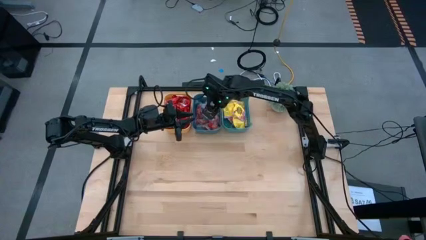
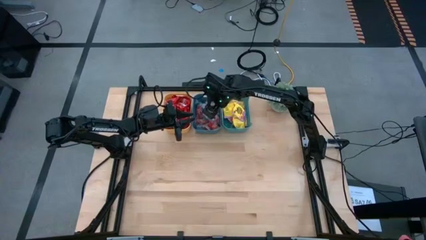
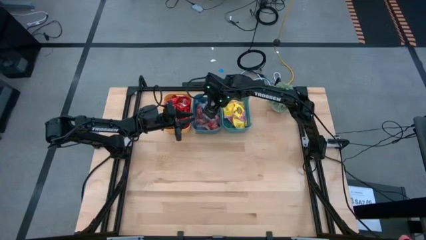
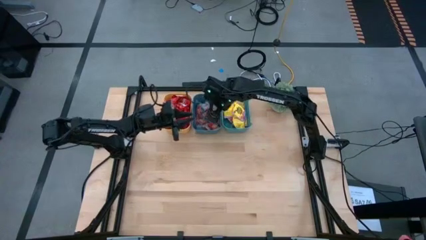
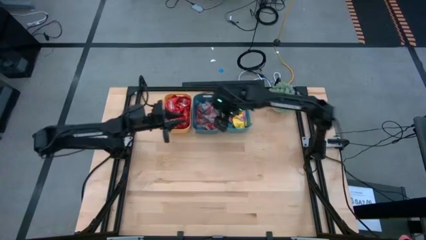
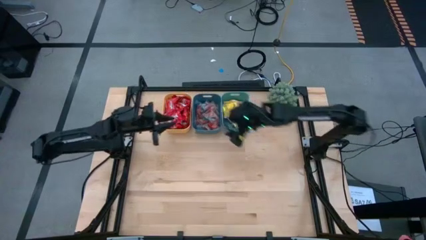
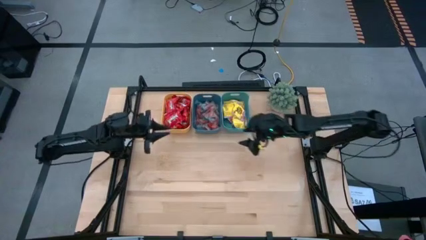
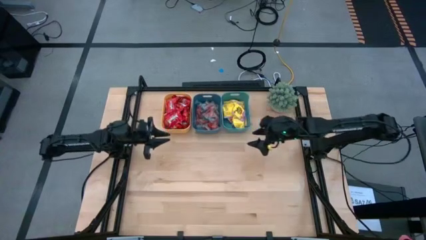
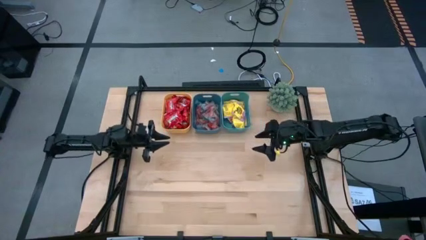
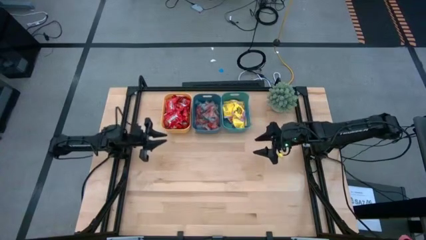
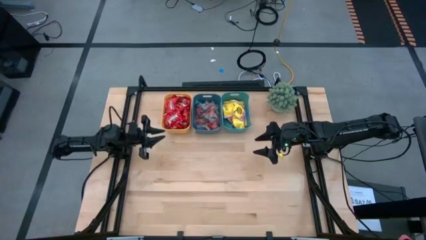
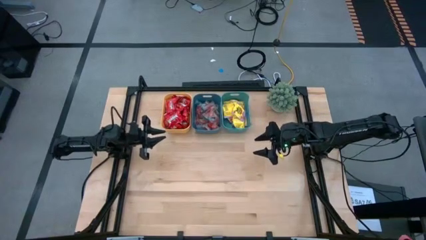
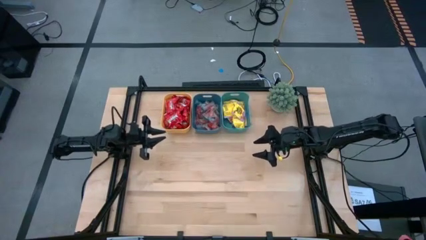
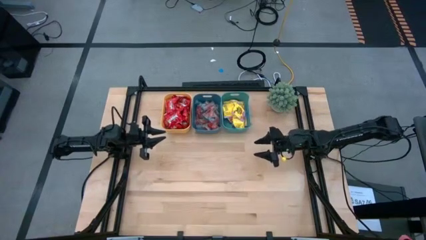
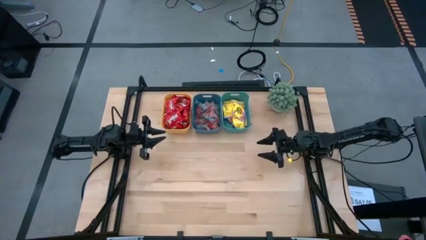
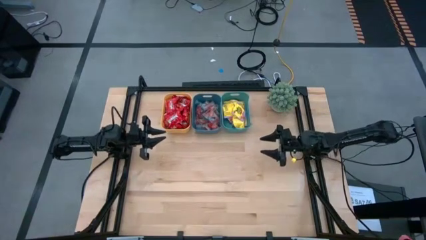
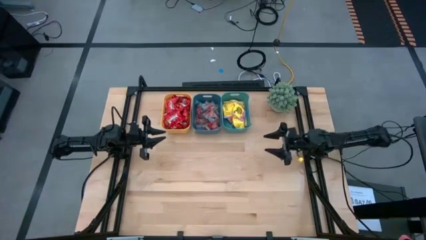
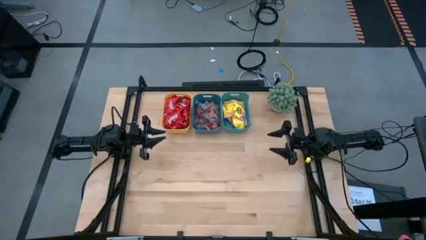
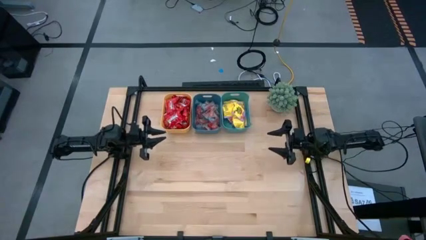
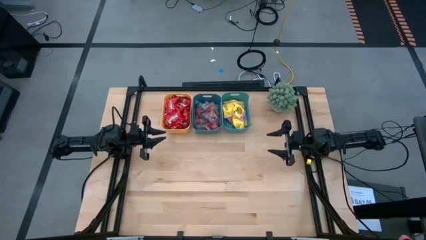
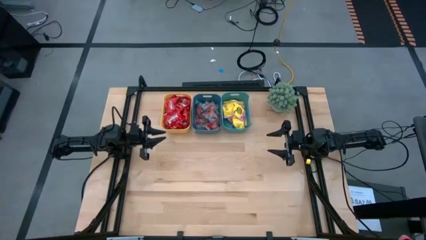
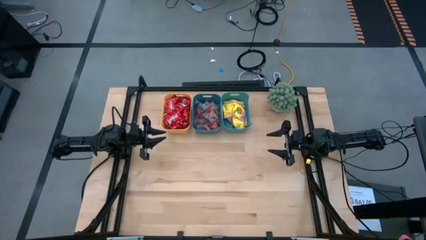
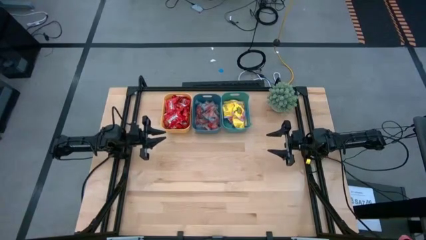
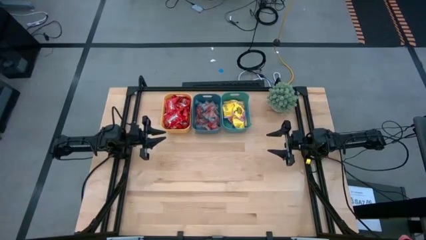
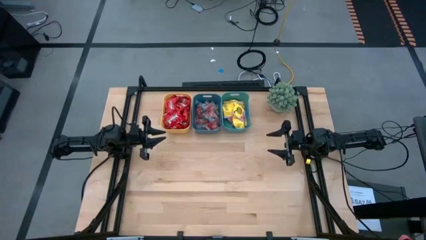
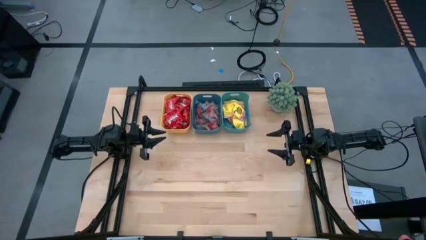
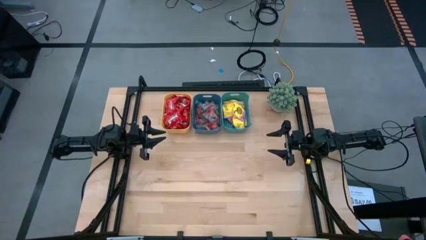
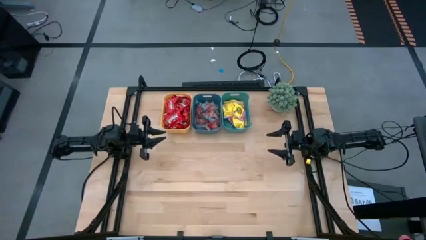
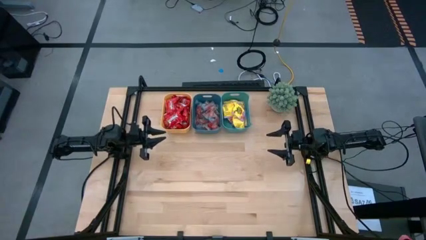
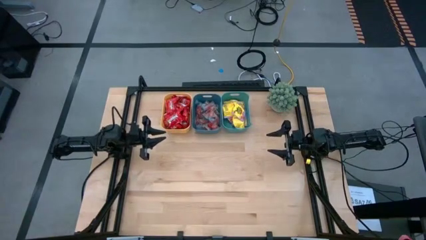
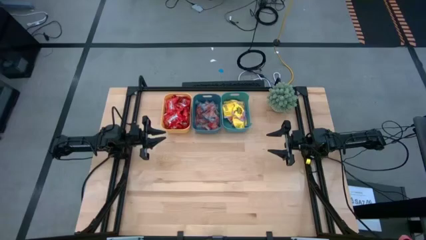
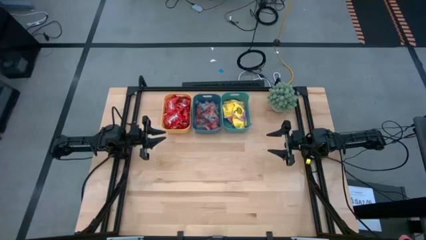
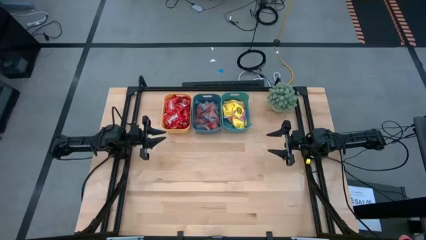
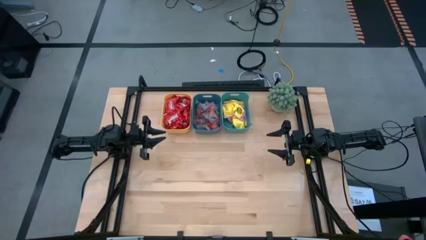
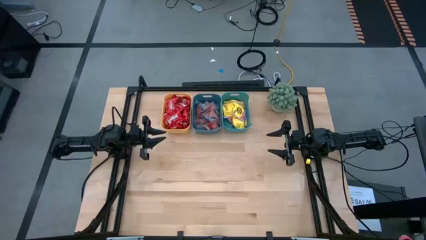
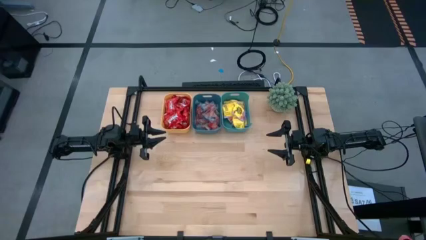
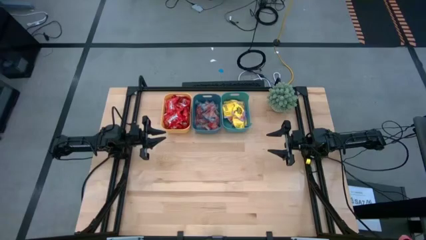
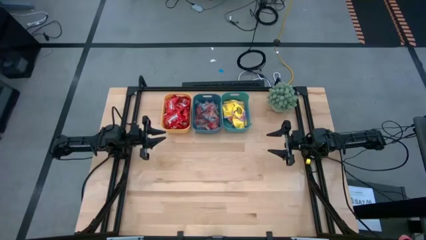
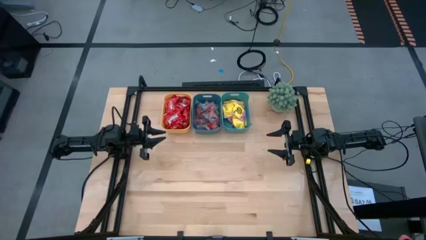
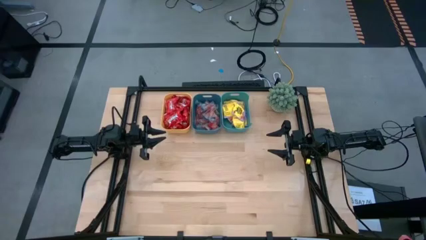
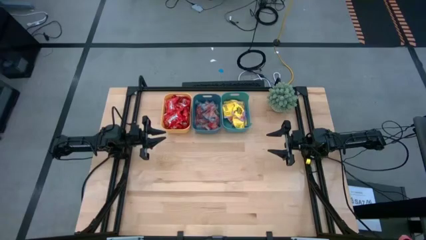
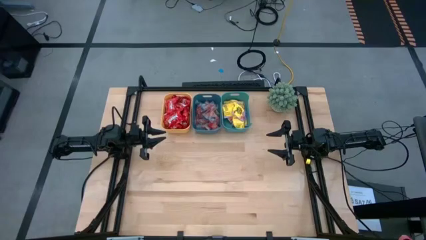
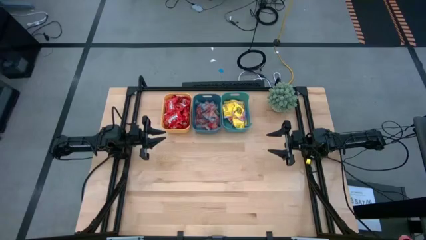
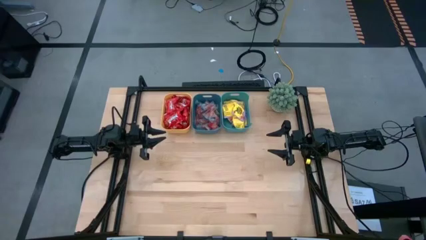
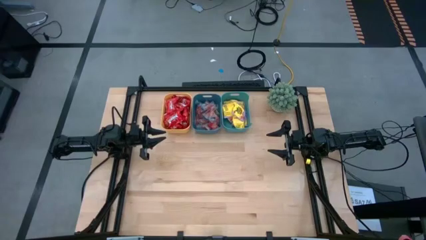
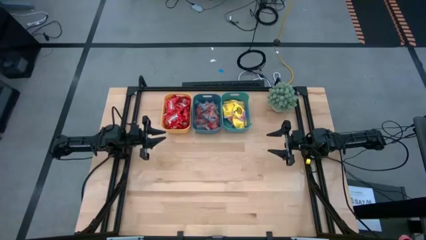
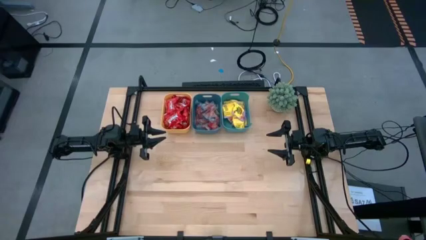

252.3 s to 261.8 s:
Task: Sort candy
Return to Home Position

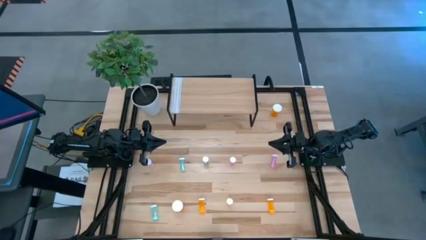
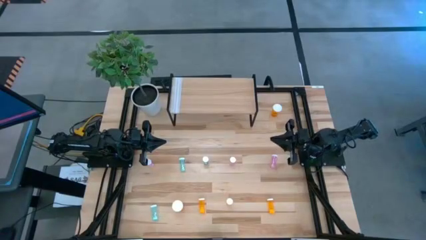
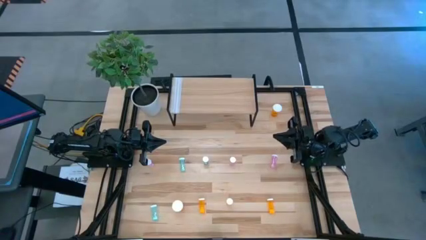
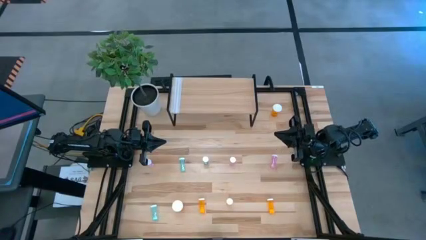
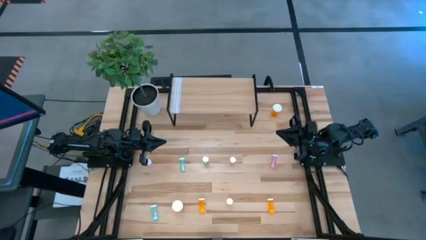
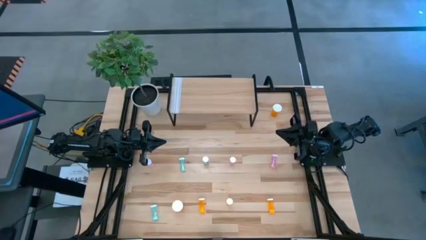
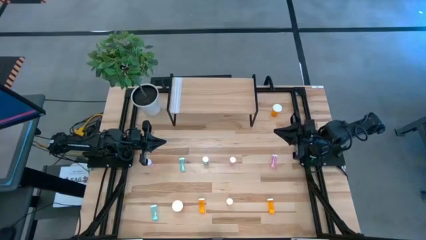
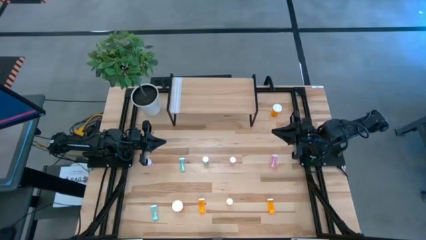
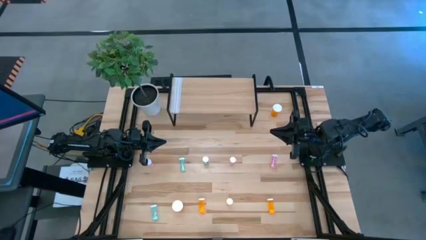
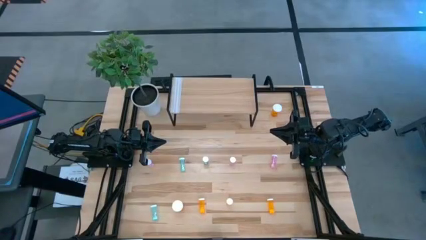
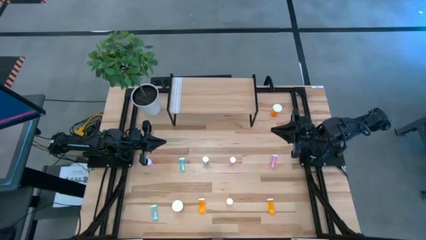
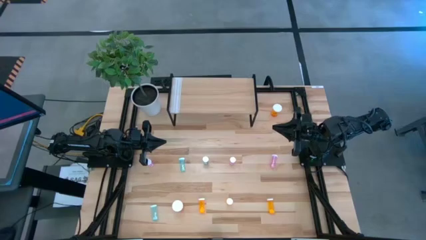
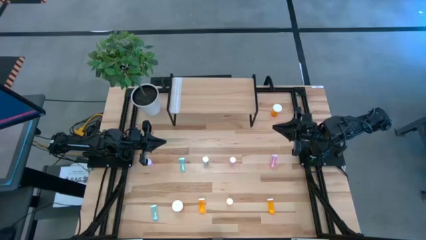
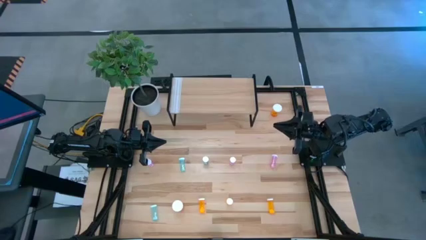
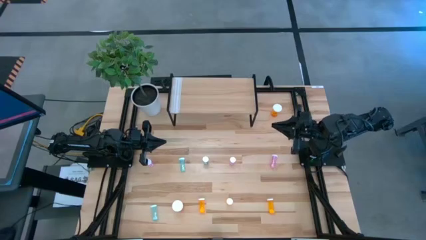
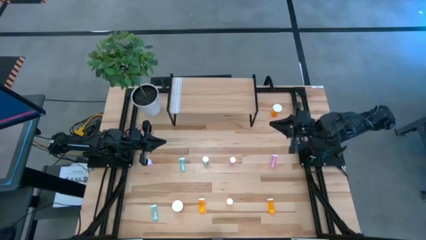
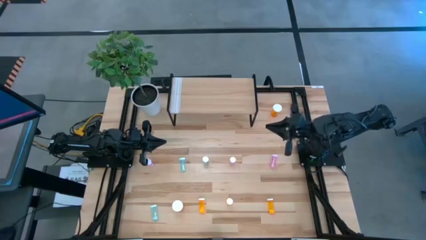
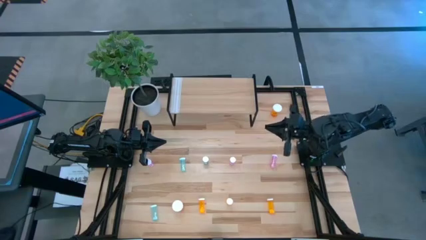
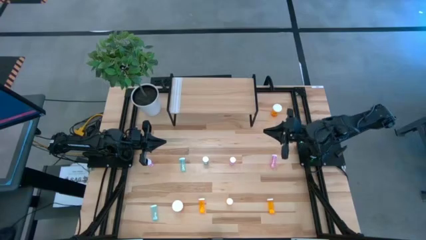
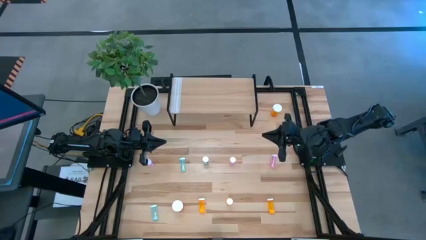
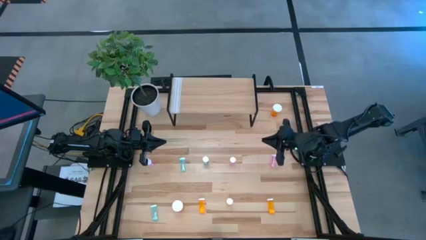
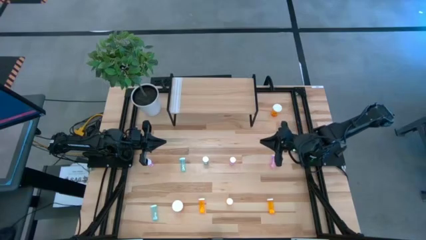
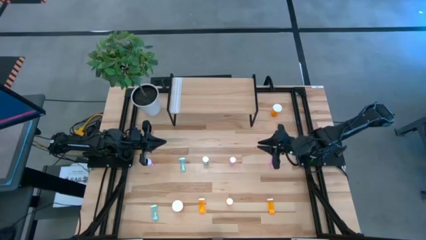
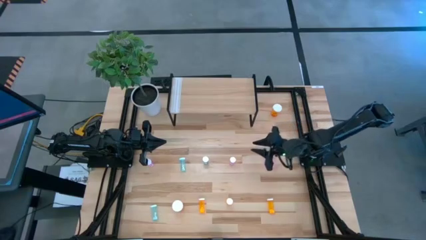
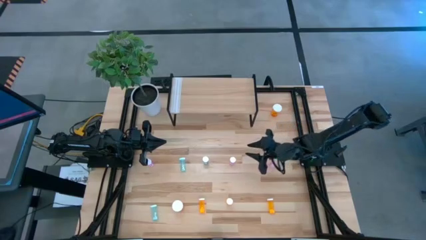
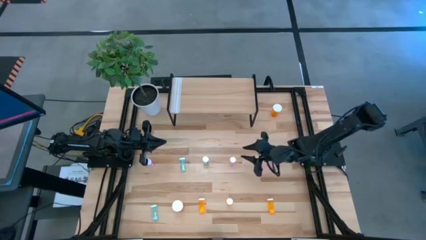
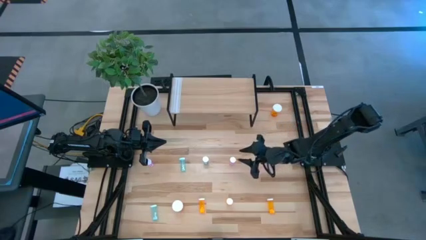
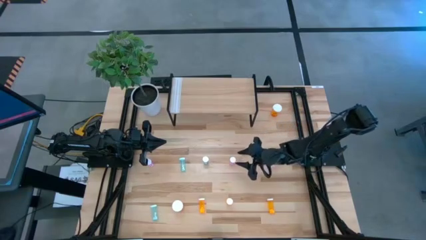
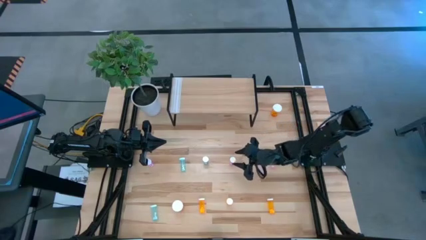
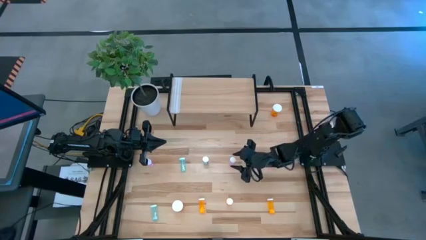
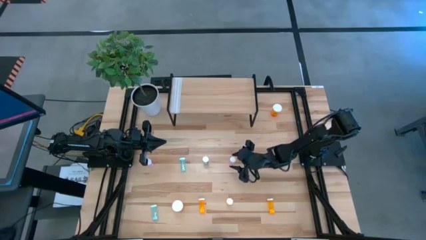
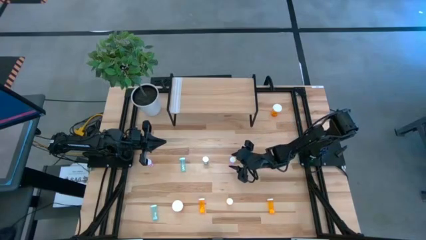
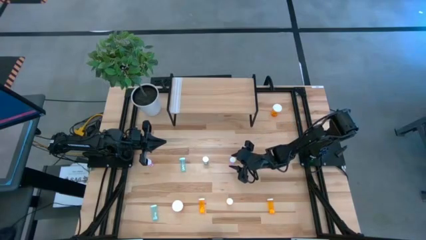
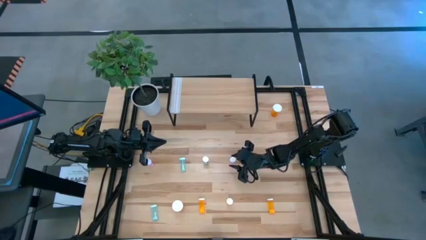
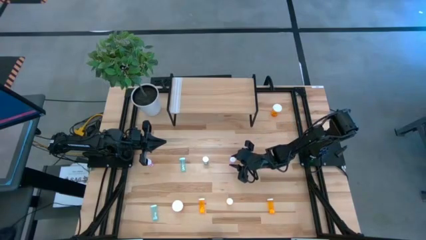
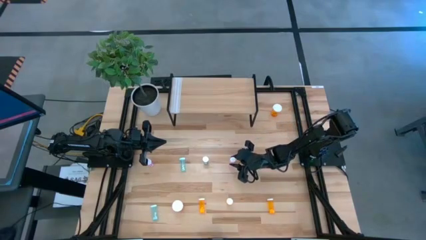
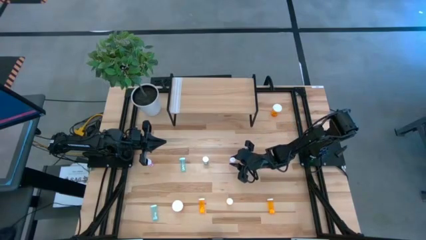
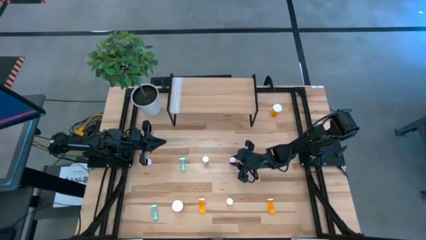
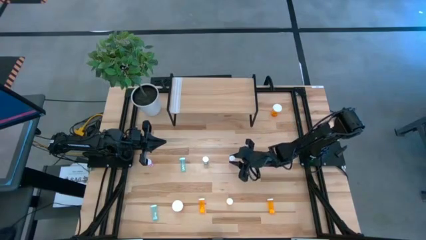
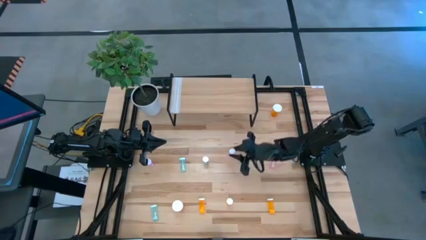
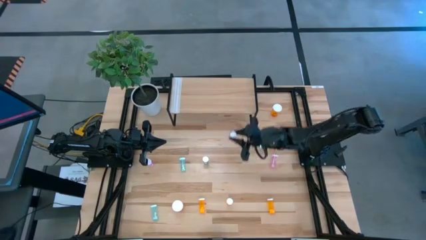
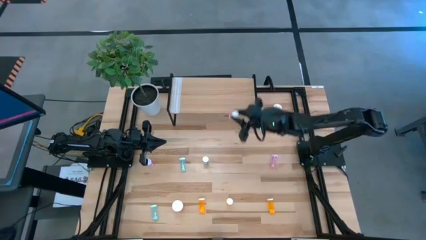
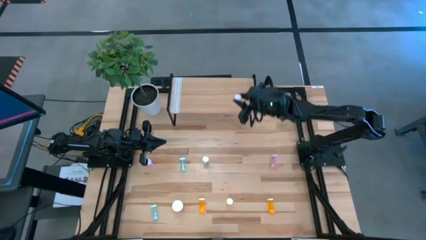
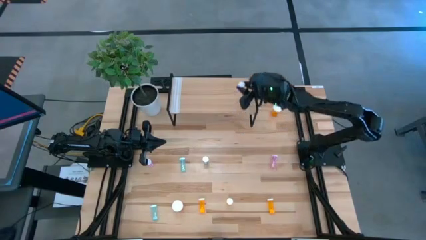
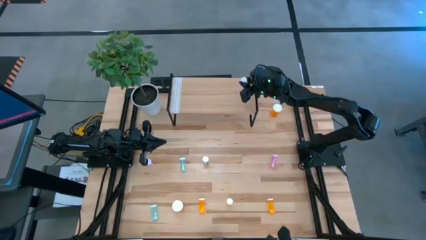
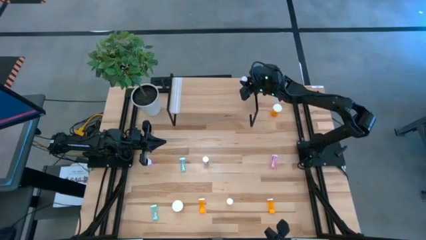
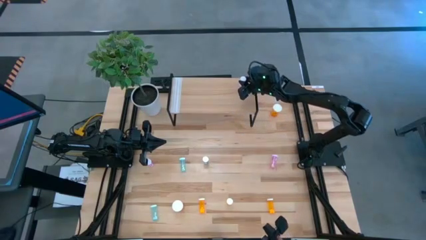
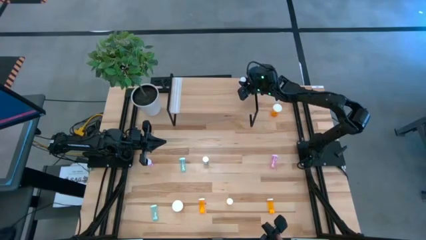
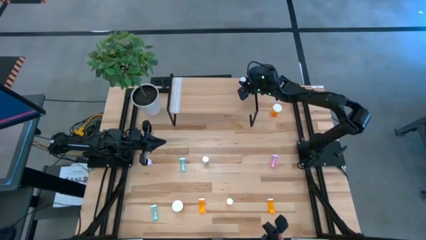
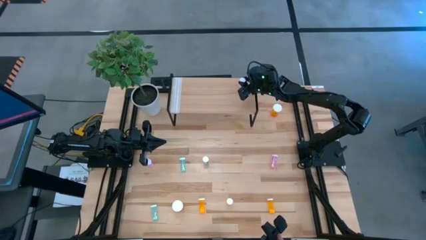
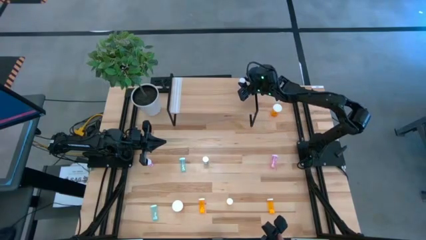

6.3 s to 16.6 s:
Task: Pick and place medicine bottles onto shelf by color
Put the middle pink pill bottle on the shelf
